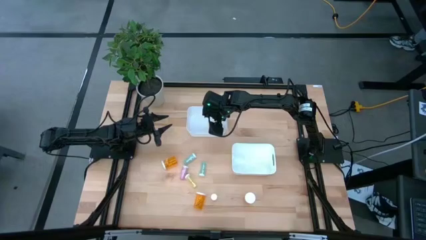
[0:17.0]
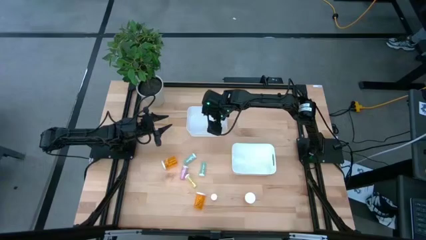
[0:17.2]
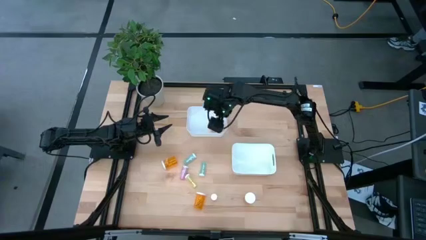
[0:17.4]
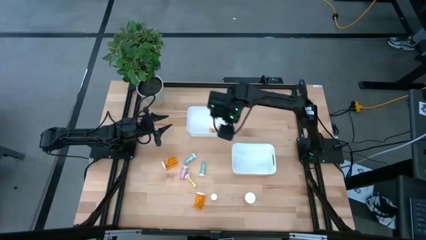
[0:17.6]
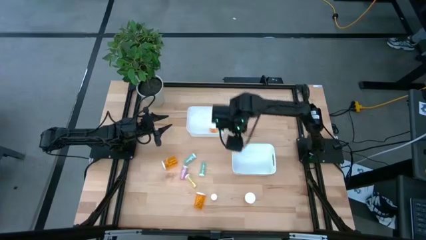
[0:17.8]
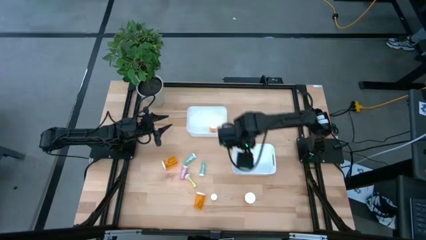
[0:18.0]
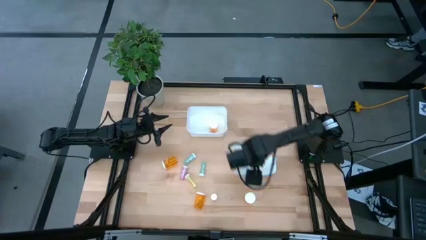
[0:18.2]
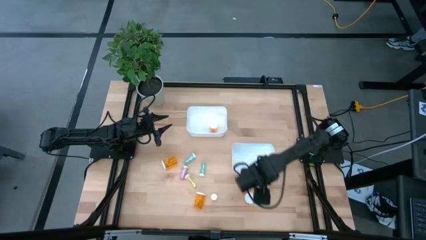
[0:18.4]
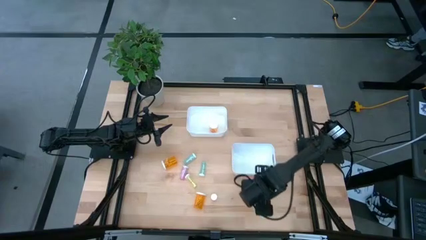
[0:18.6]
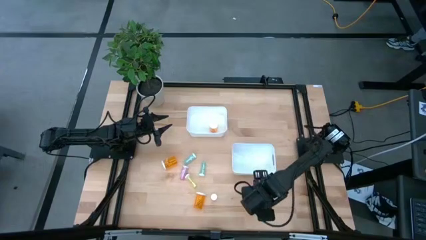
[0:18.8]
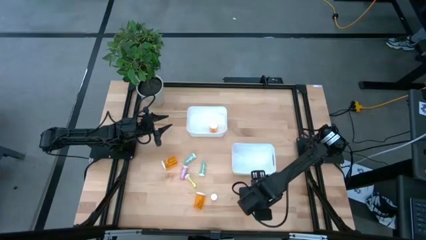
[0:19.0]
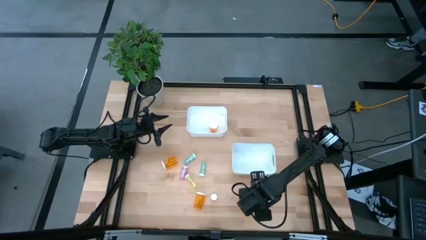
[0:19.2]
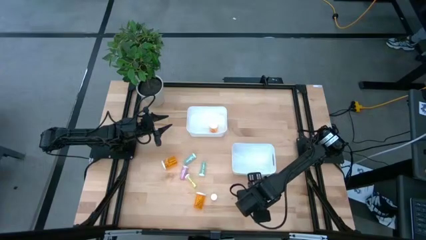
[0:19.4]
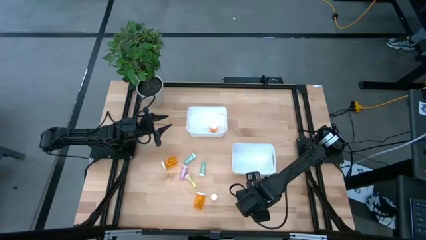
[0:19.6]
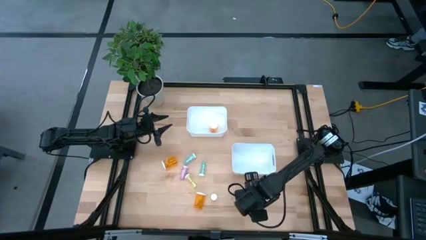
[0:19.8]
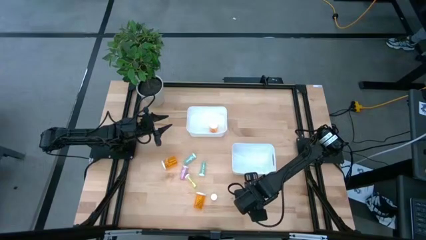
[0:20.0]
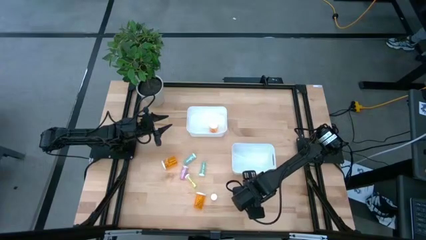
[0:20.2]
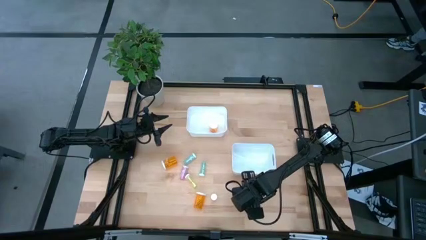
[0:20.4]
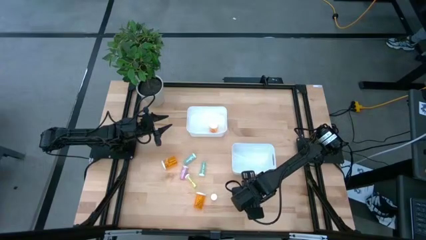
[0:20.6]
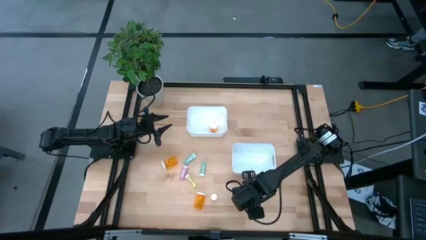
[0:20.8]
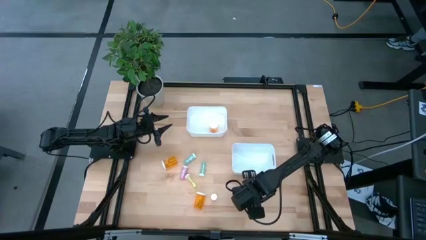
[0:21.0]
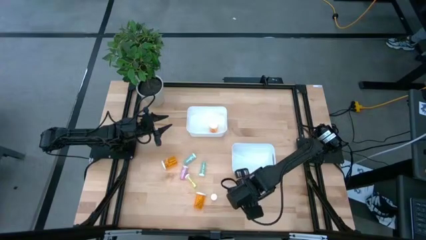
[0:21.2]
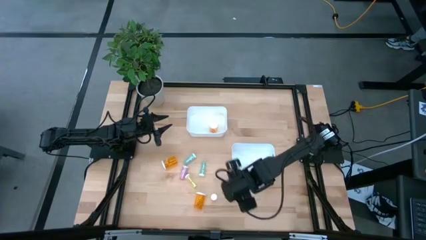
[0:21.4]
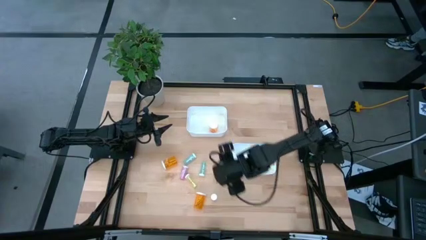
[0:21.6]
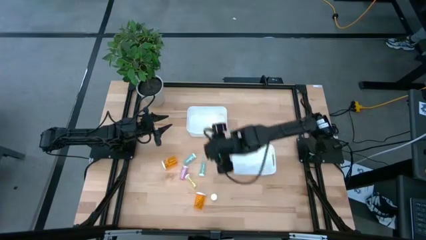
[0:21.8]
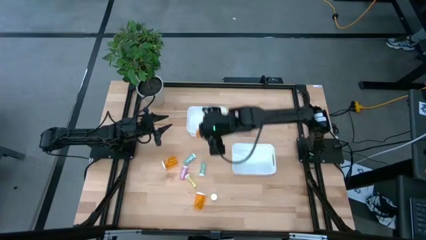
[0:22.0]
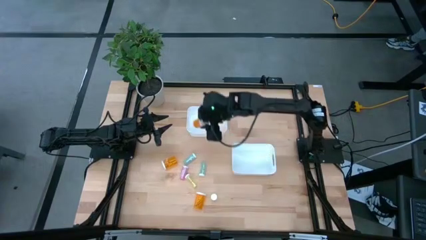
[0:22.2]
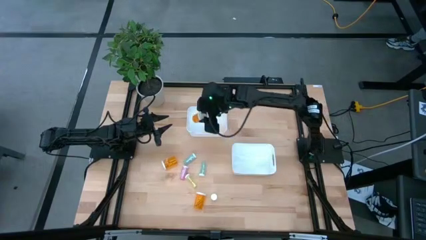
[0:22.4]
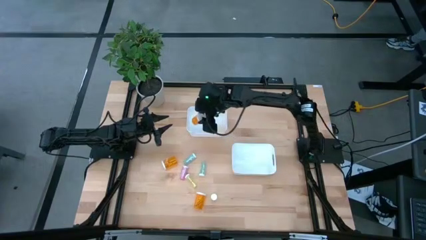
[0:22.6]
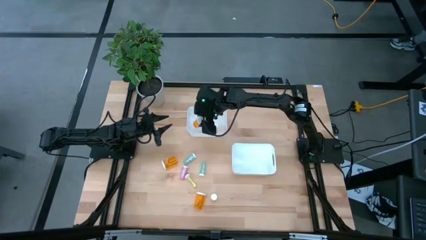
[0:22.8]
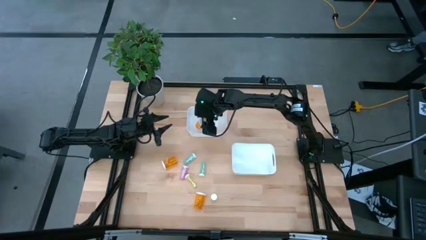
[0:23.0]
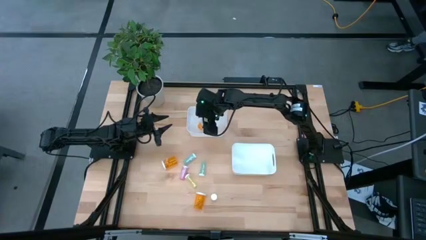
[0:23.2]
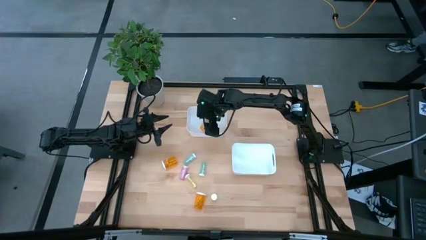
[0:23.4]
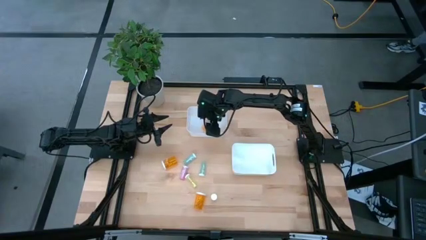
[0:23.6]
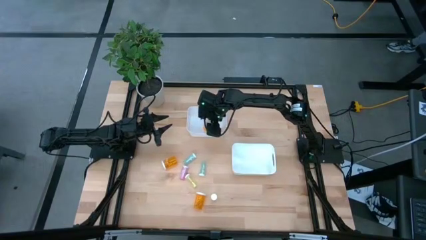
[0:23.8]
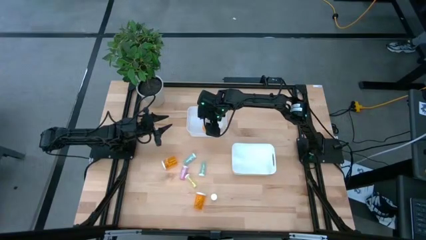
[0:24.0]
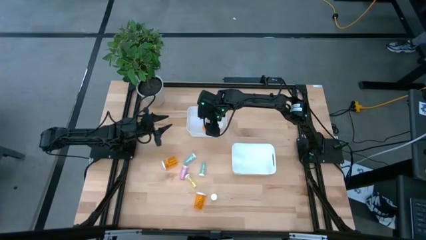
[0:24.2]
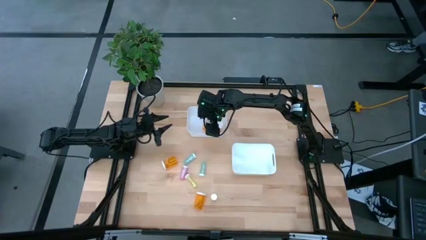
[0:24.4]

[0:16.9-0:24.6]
Task: Pick and place medicine bottles into bin by pill shape (circle, oval)
Put the large orange pill bottle into the top white bin

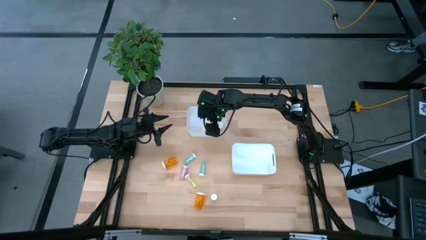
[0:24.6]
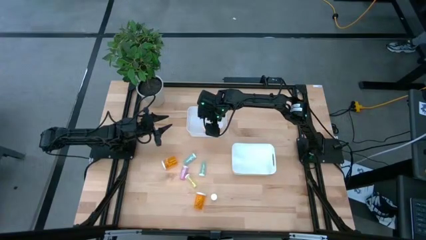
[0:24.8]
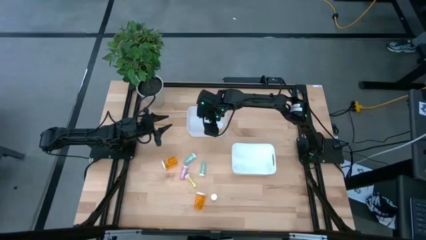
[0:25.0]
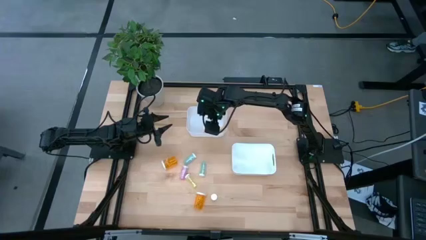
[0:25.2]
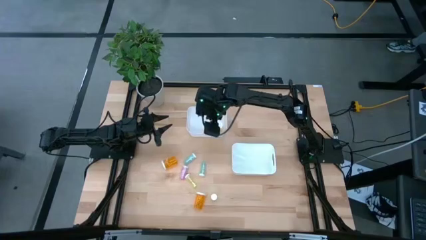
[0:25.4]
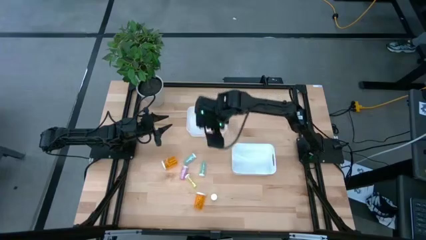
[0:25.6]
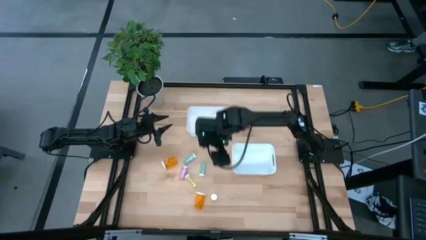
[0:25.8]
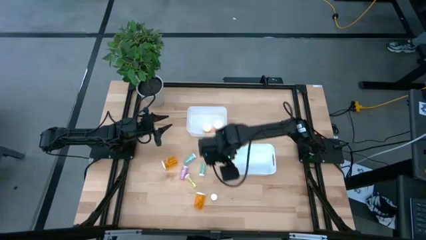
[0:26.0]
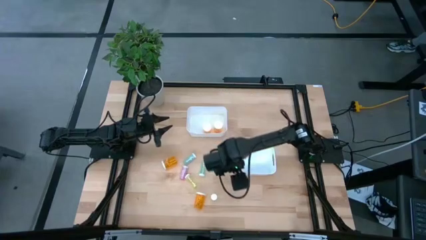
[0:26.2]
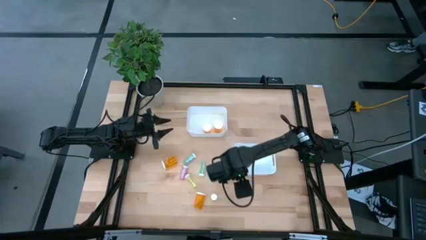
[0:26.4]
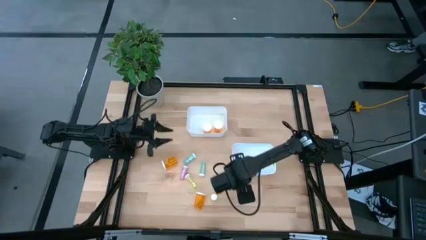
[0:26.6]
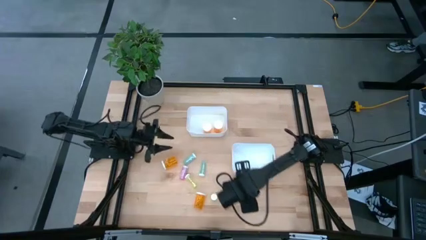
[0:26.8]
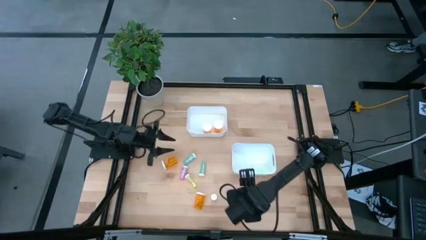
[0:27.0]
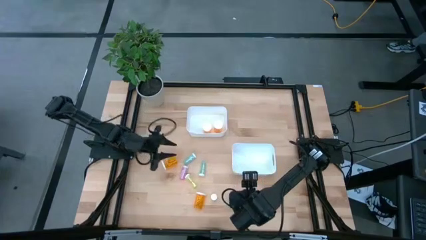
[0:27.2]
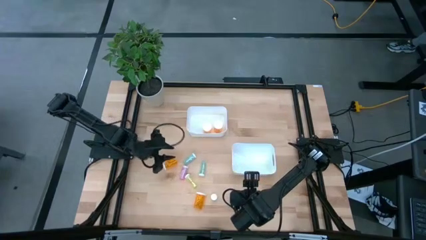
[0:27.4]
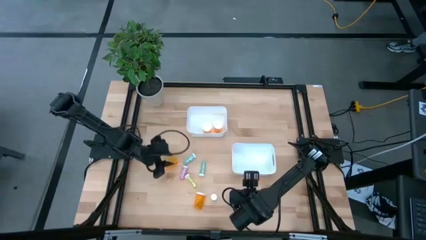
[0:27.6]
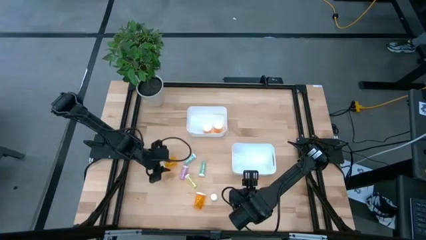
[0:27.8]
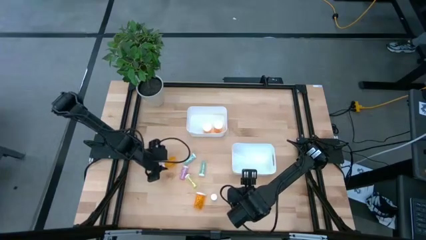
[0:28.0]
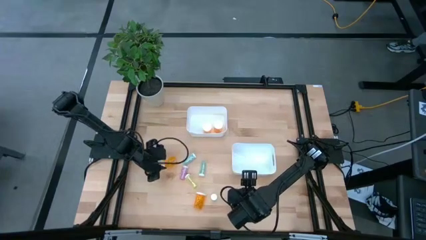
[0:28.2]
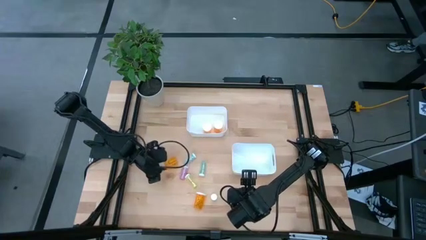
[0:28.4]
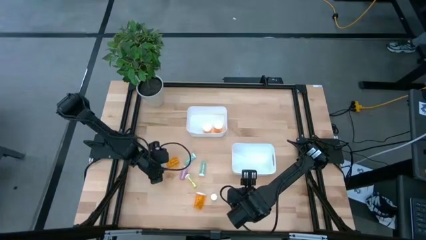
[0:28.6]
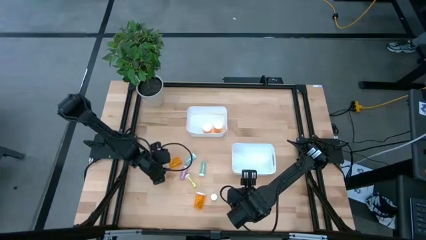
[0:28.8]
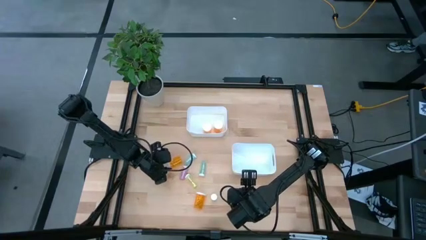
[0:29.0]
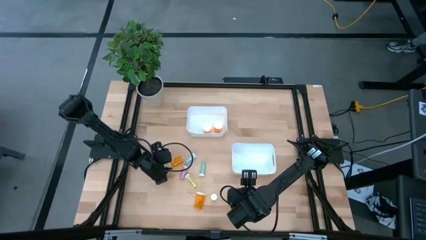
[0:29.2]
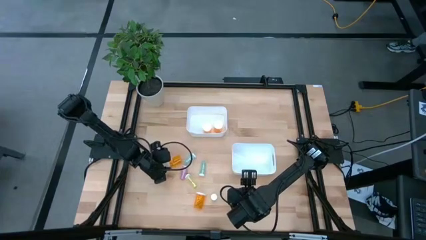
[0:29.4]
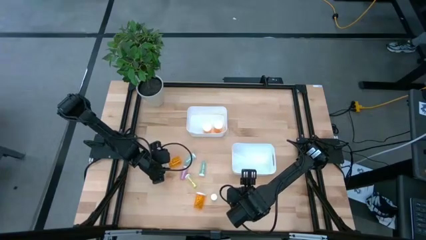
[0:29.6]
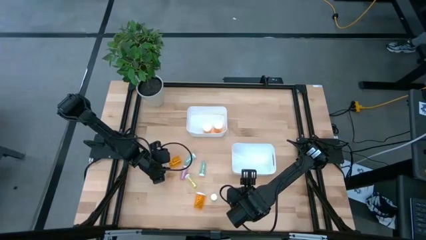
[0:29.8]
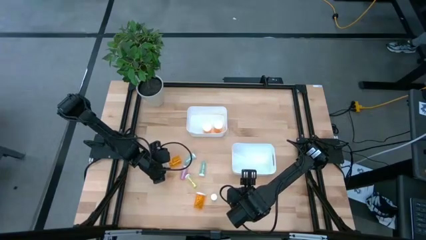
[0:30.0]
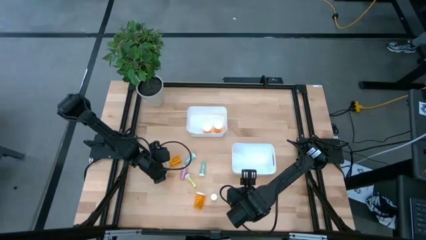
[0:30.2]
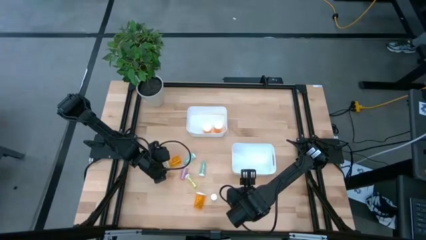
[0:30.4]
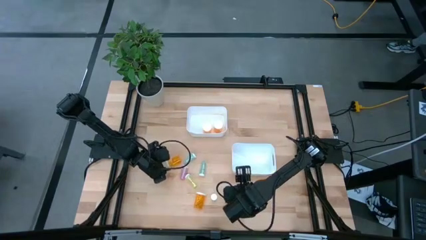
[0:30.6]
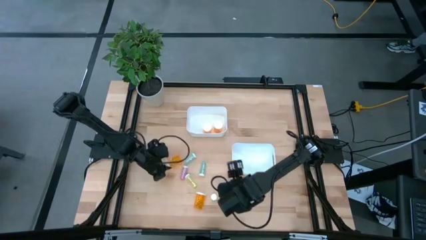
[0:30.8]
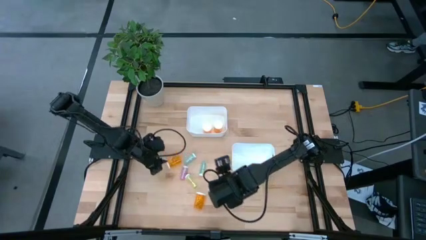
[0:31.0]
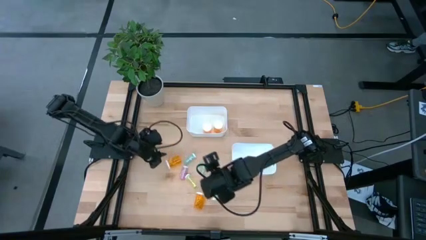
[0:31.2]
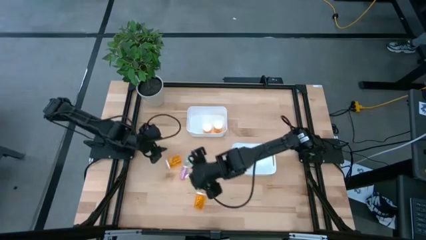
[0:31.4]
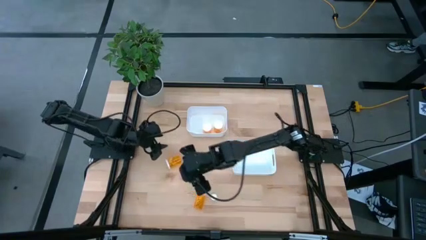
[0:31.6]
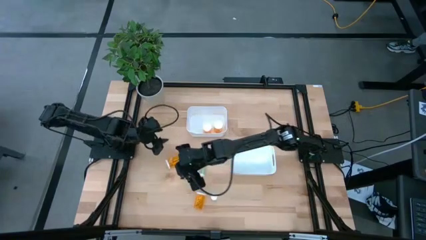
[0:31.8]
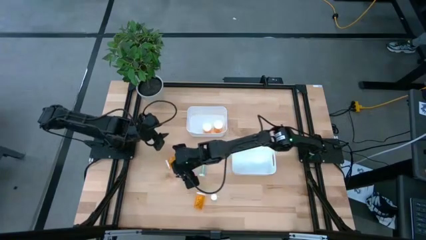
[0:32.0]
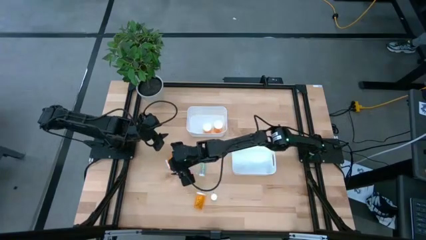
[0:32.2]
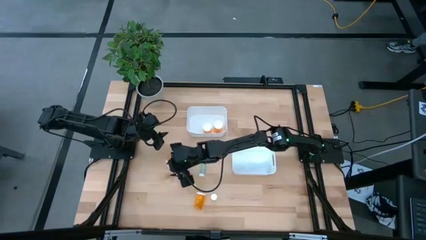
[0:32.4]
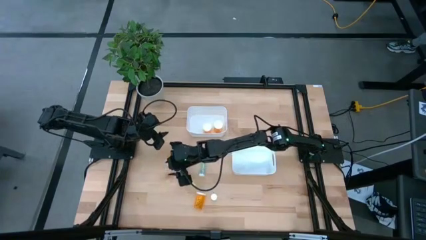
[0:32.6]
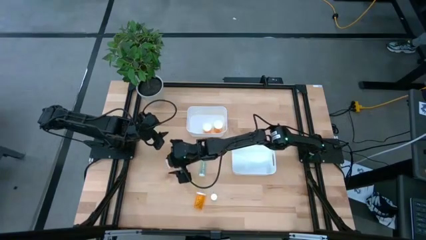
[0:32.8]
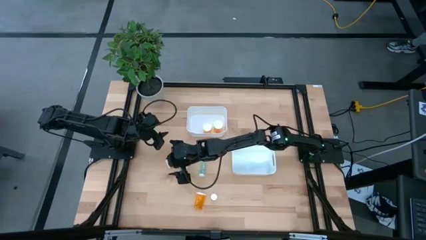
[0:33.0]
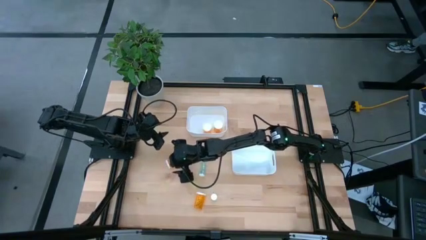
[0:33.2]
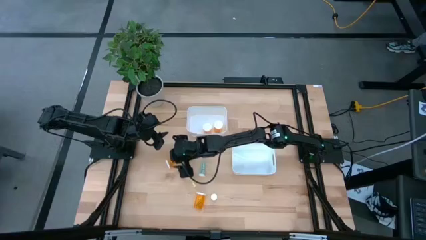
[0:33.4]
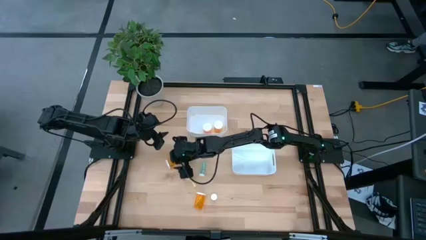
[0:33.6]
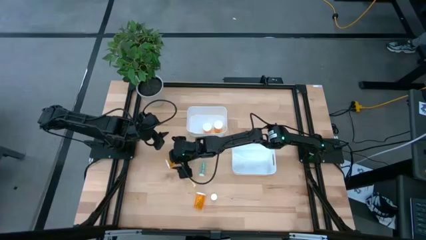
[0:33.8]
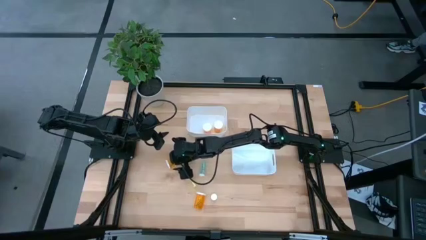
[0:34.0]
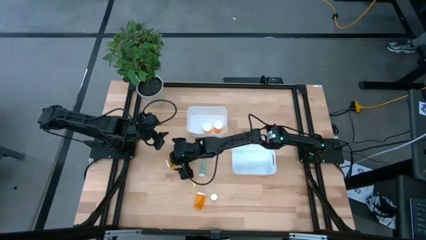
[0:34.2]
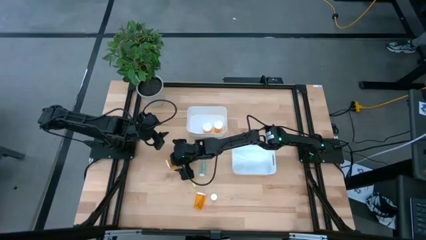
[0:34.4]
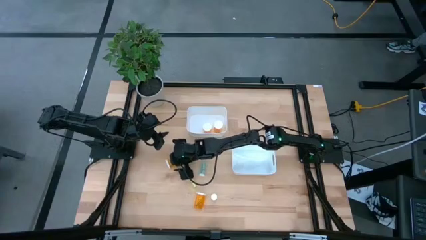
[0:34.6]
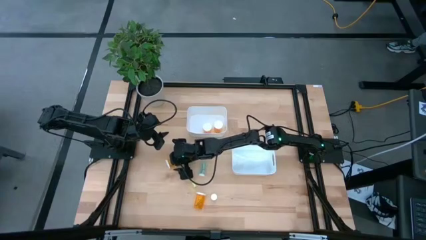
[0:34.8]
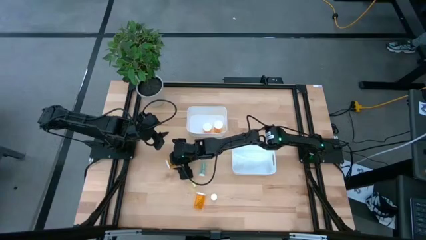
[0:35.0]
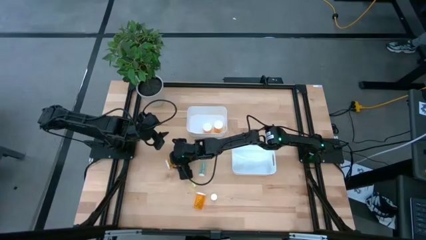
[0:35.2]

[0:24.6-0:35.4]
Put the large orange pill bottle into the top white bin
